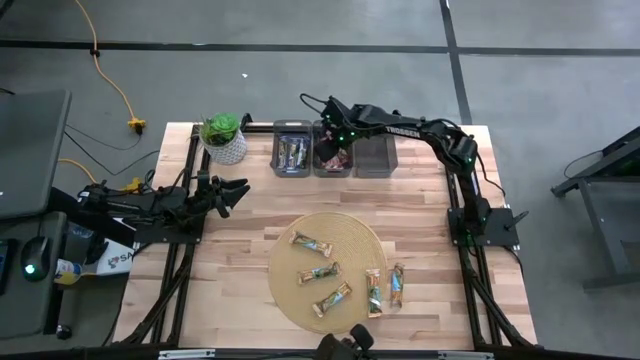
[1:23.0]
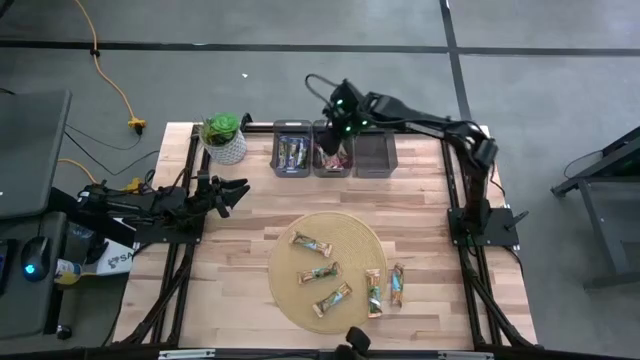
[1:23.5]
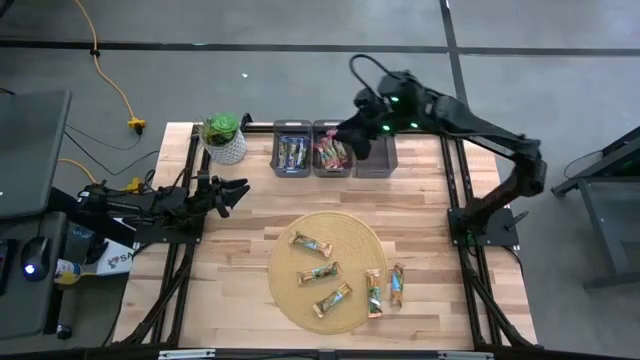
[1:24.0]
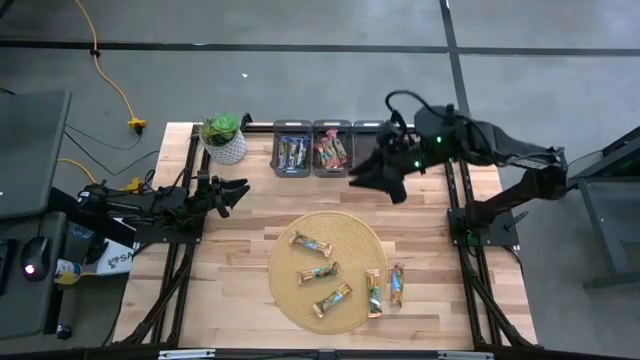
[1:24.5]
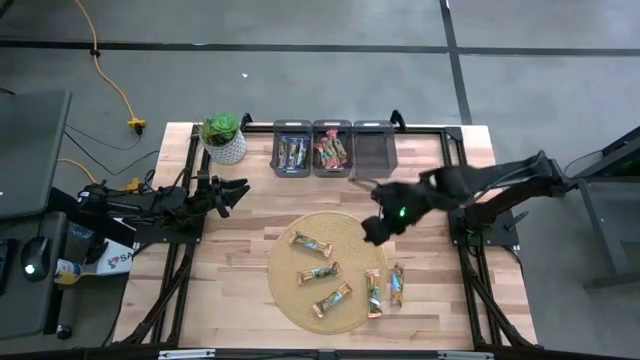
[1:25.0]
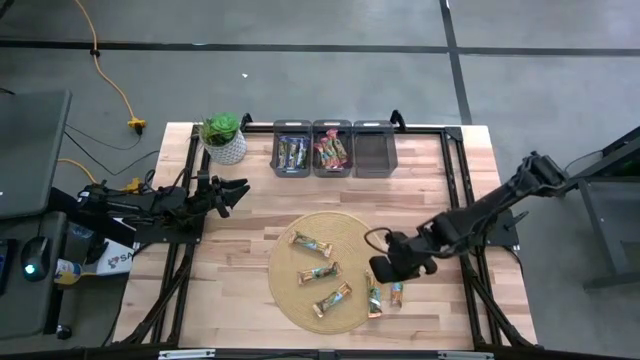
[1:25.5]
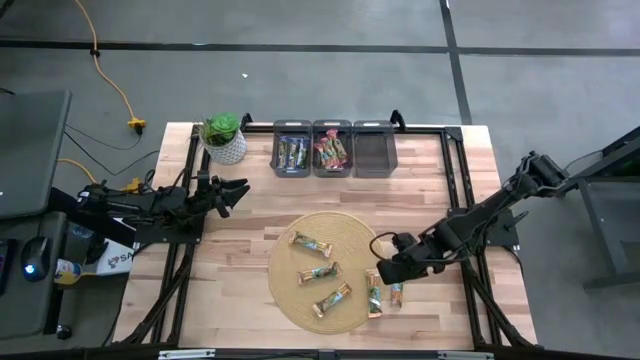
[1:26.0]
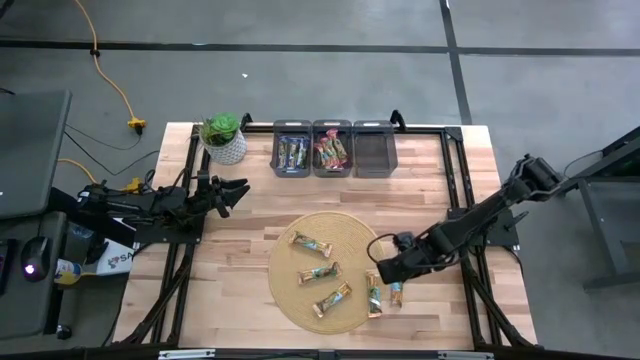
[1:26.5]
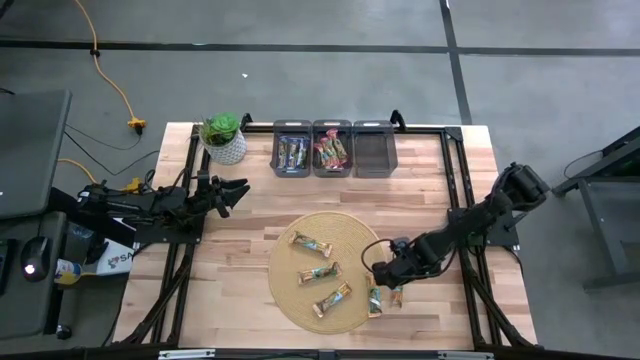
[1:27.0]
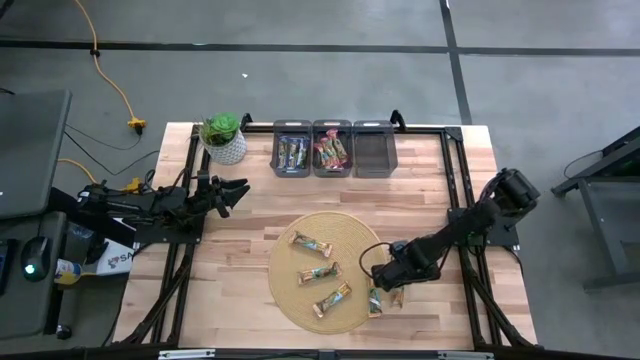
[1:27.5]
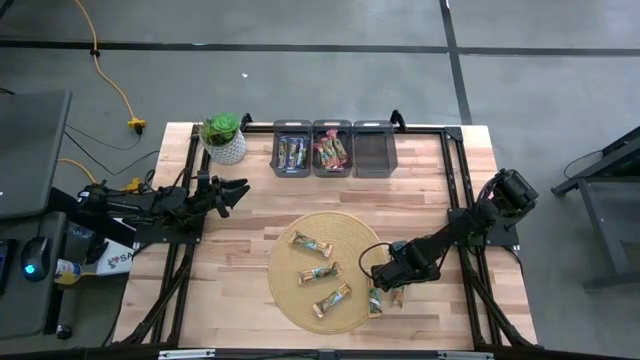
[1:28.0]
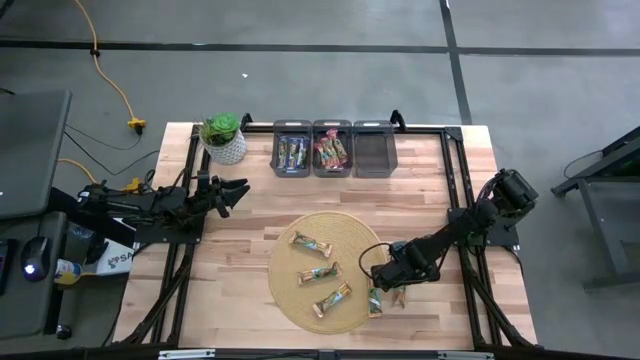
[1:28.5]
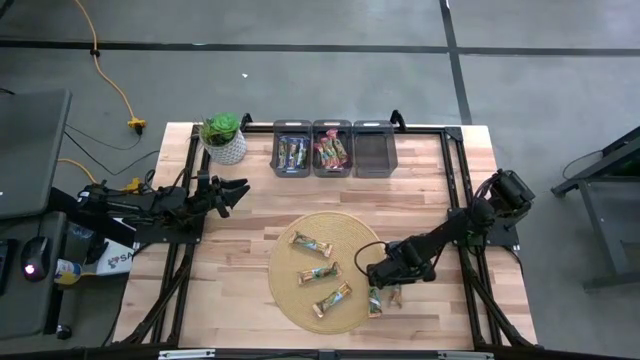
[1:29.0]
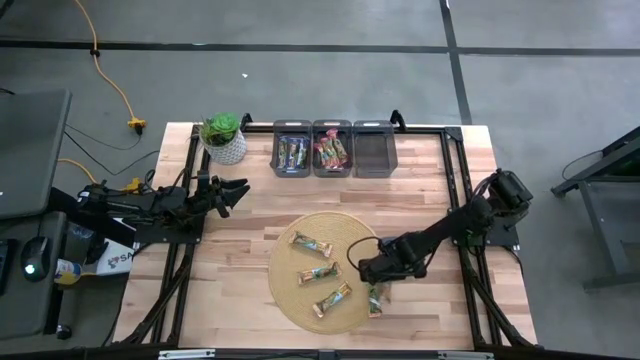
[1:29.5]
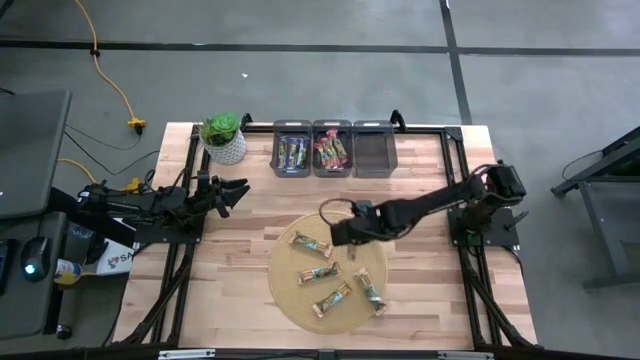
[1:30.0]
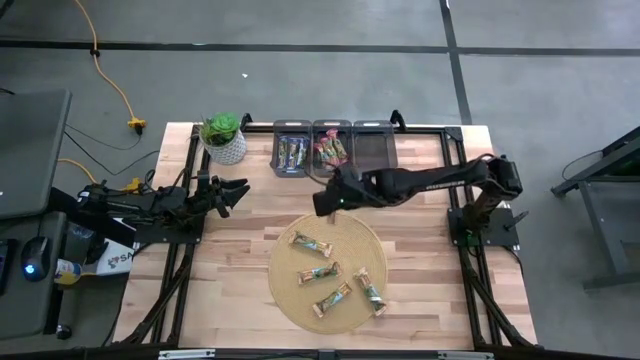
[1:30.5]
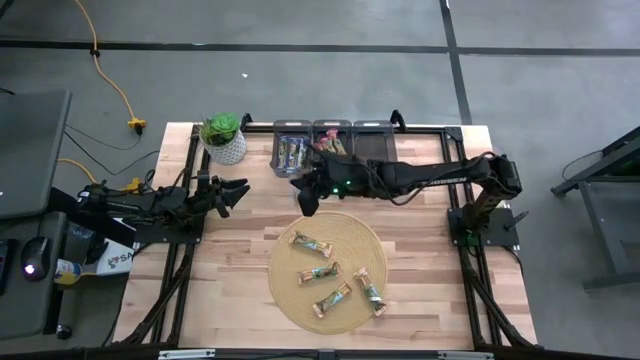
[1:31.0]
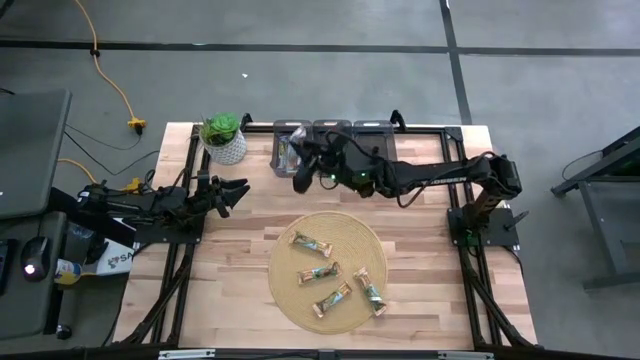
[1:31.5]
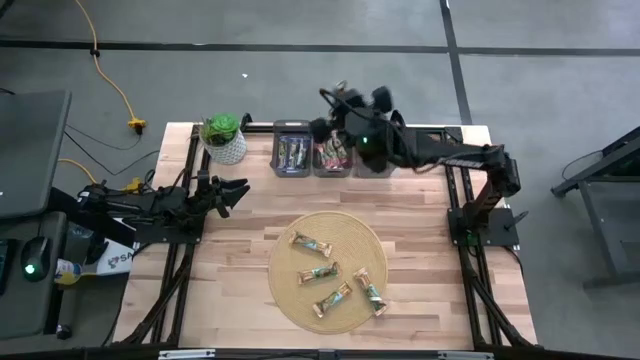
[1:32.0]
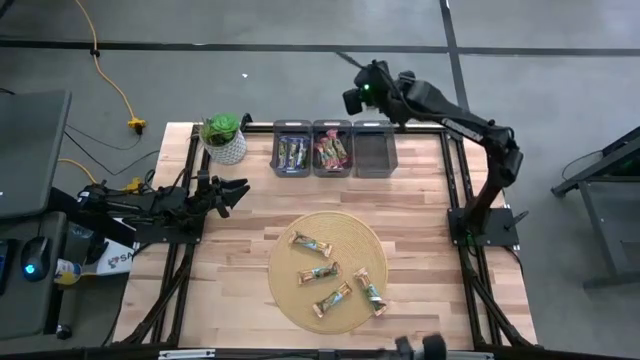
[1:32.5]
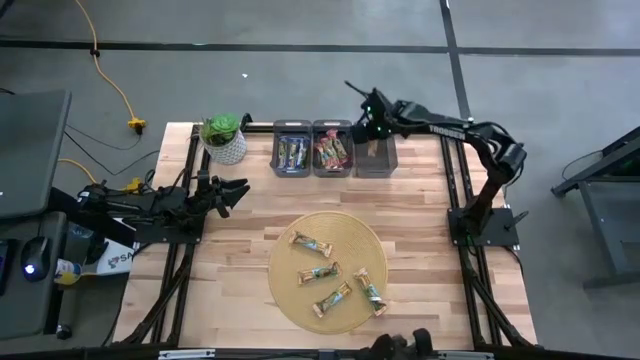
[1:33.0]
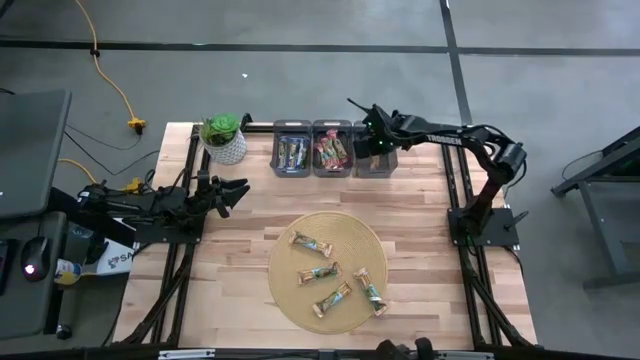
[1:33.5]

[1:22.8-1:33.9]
Task: Pick and place Granola Bars by type
Put the yellow granola bar into the right black bin

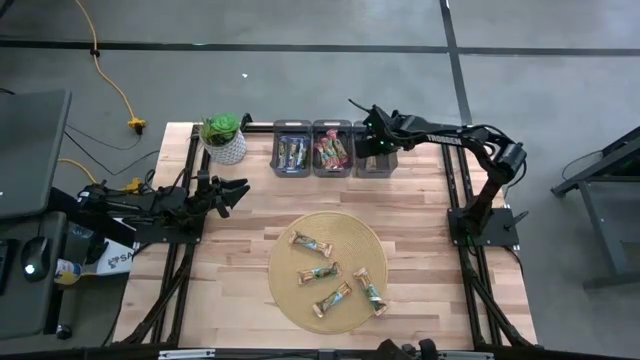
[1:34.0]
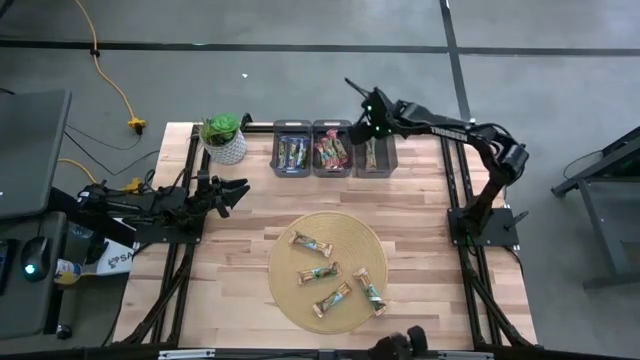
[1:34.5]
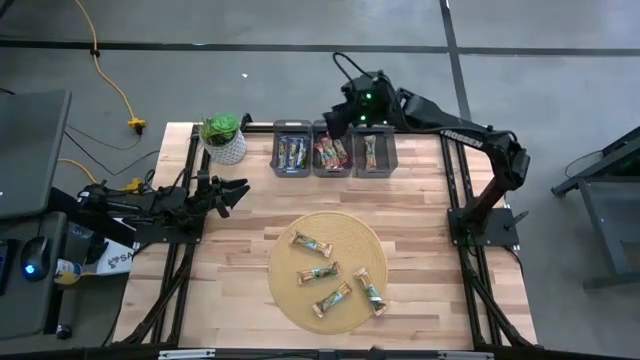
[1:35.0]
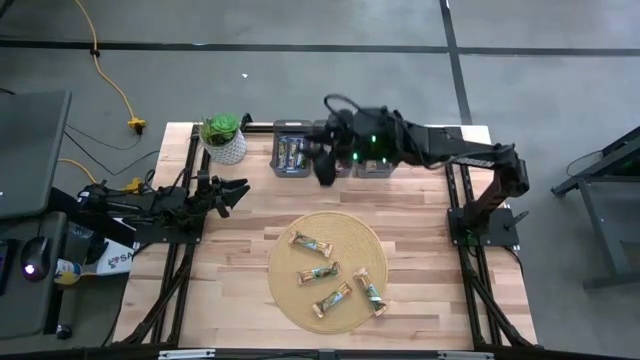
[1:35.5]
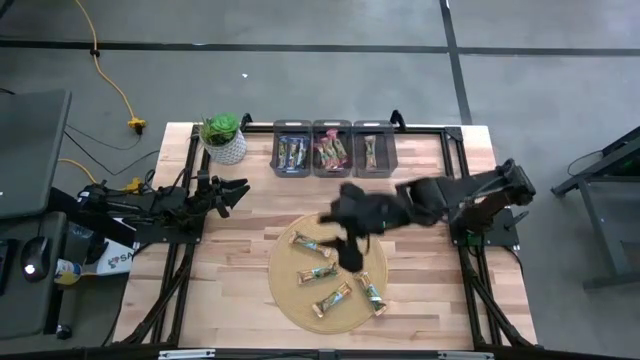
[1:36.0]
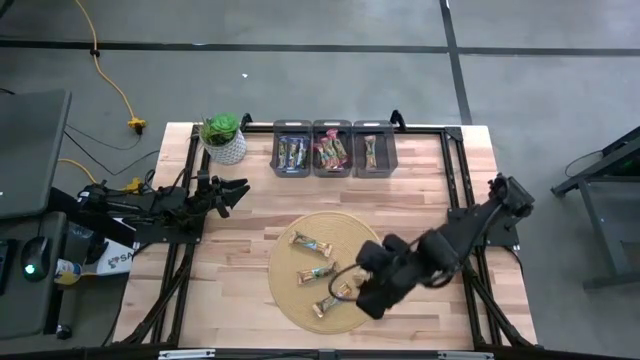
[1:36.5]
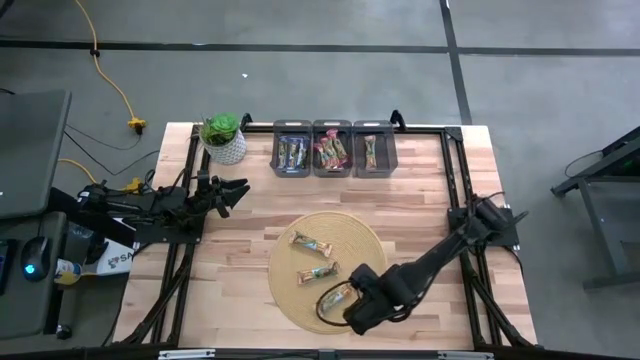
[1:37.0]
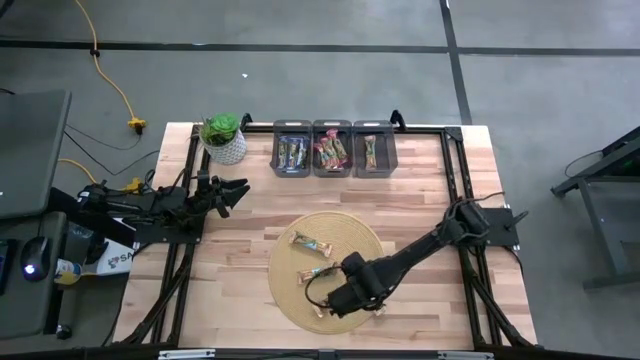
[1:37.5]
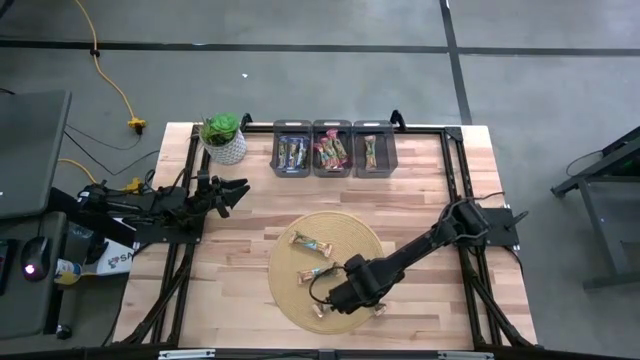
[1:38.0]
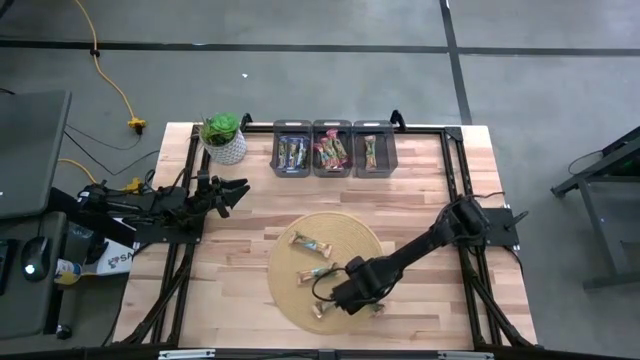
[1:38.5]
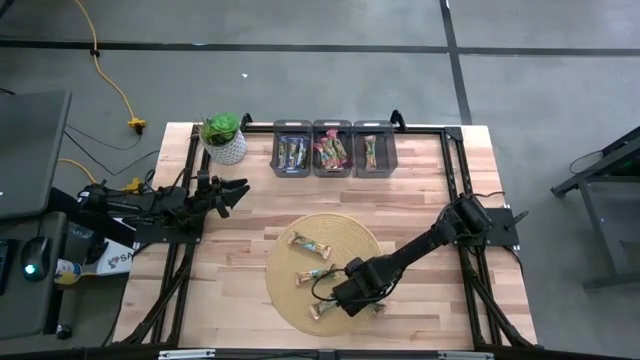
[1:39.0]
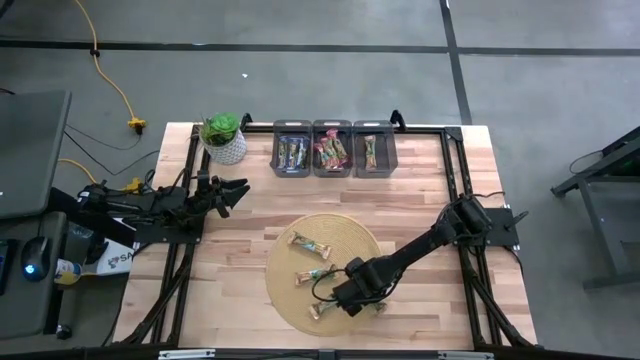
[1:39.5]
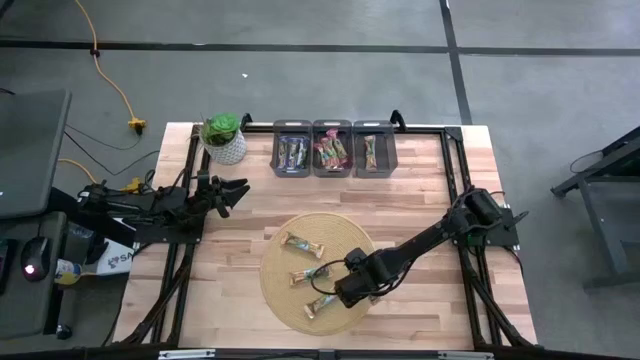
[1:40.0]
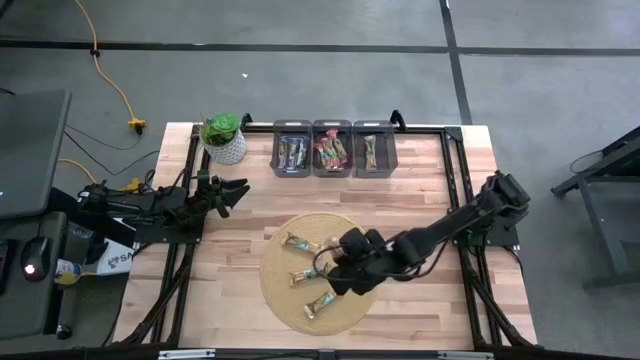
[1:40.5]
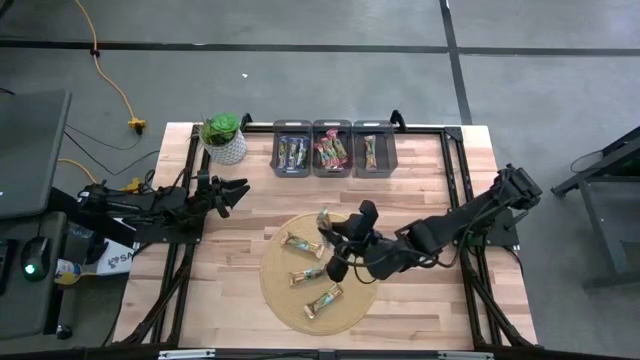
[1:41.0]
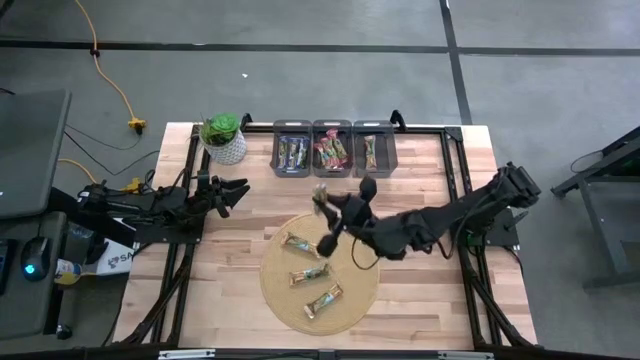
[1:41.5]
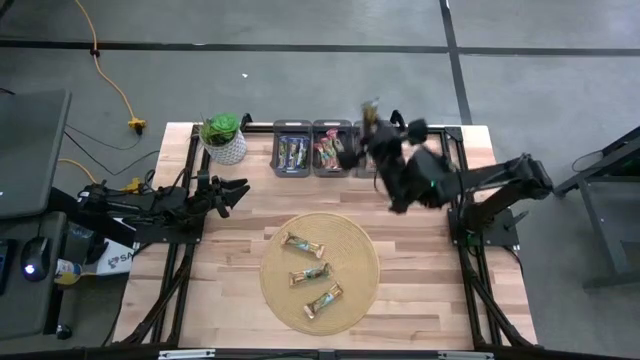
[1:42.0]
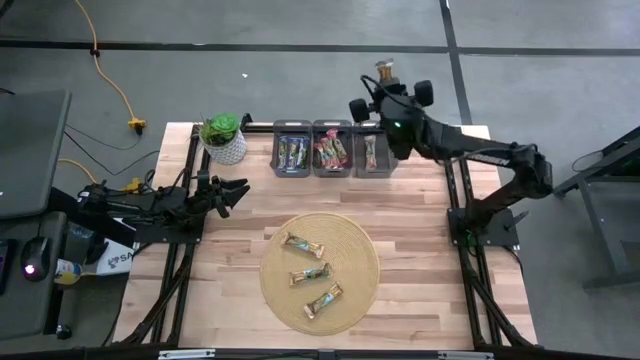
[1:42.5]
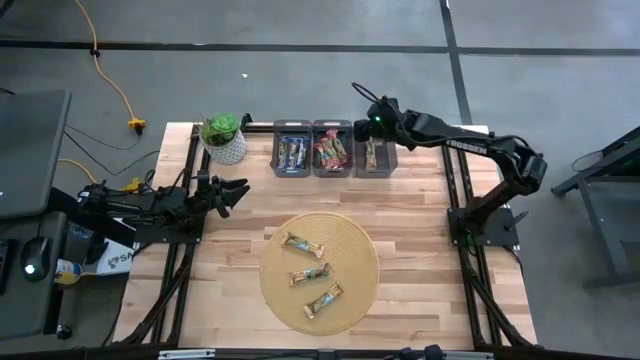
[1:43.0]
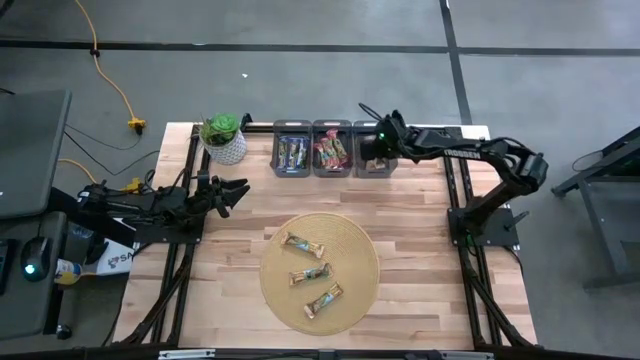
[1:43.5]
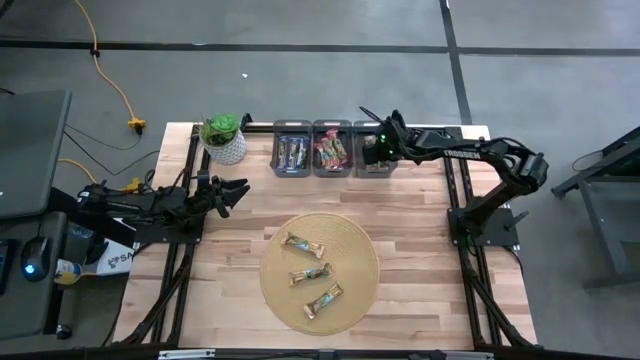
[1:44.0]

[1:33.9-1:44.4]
Put the yellow granola bar into the right black bin
